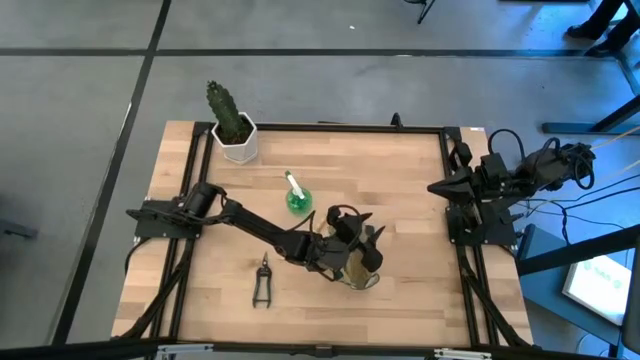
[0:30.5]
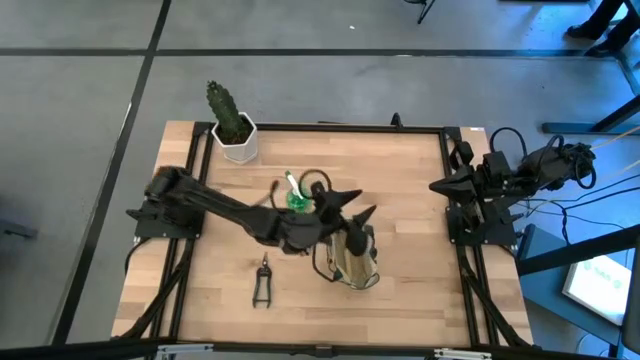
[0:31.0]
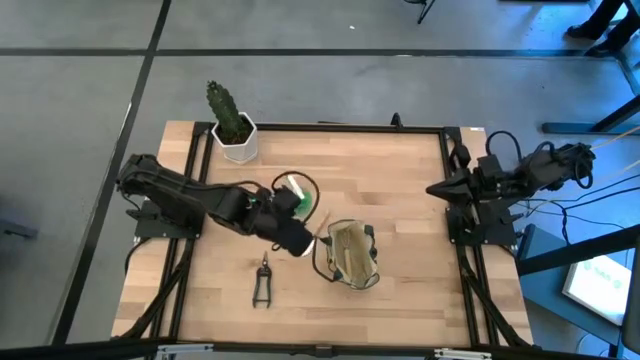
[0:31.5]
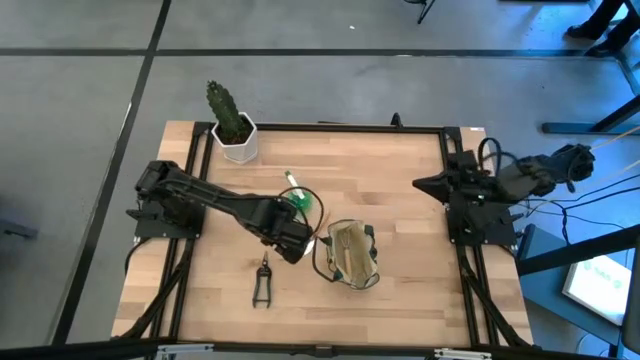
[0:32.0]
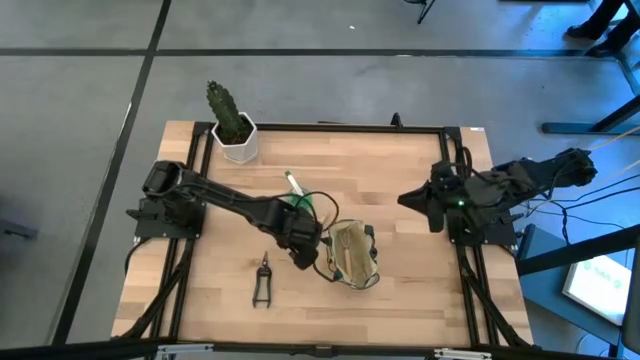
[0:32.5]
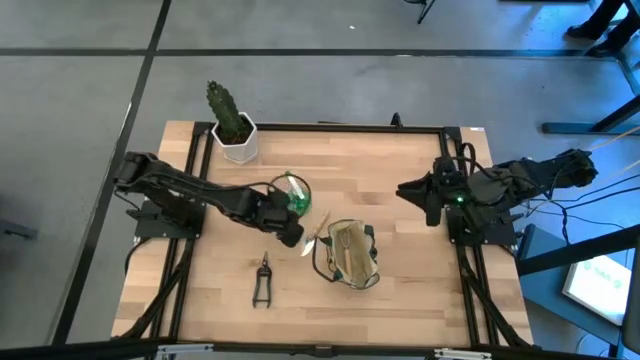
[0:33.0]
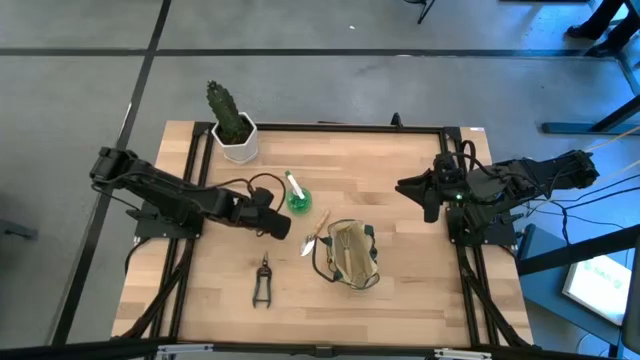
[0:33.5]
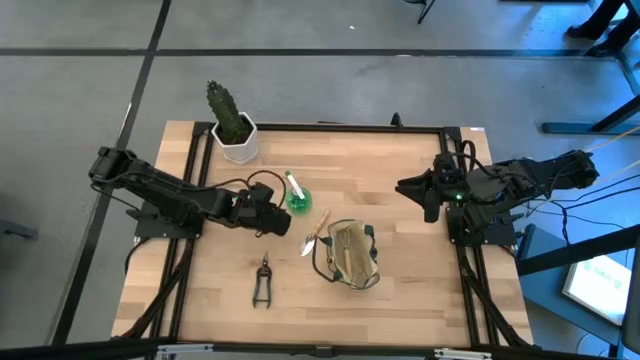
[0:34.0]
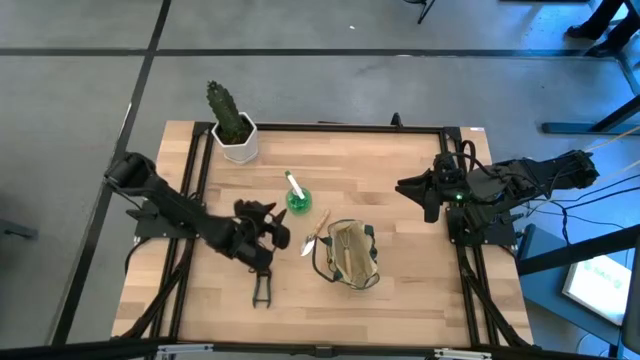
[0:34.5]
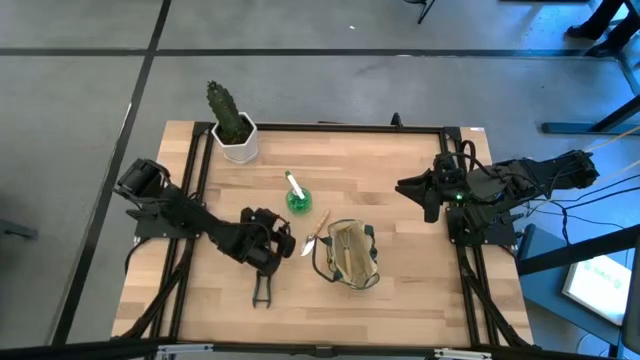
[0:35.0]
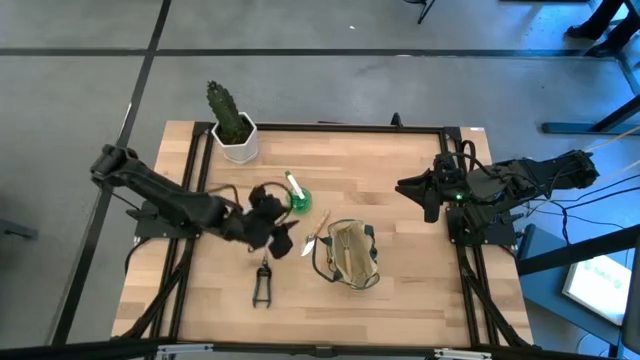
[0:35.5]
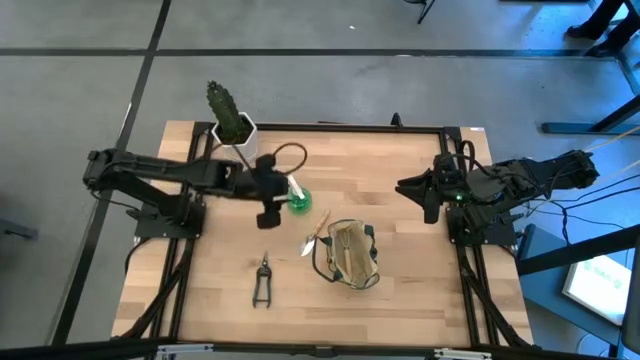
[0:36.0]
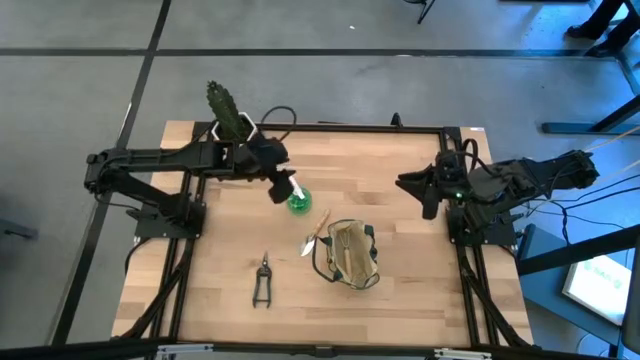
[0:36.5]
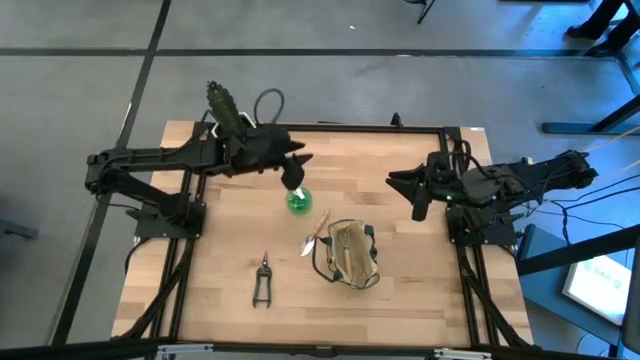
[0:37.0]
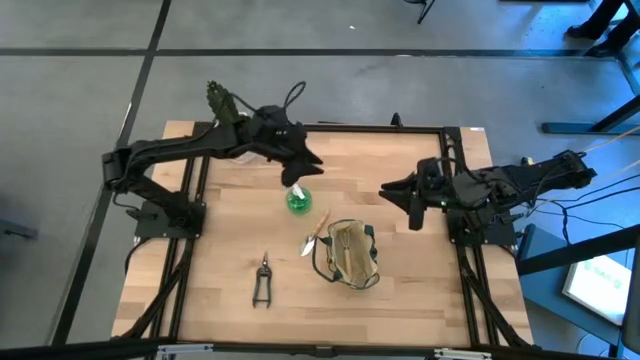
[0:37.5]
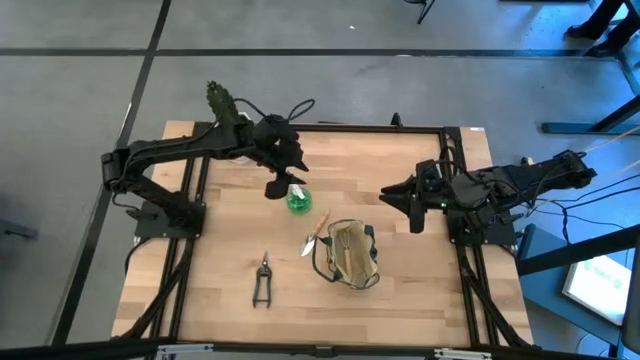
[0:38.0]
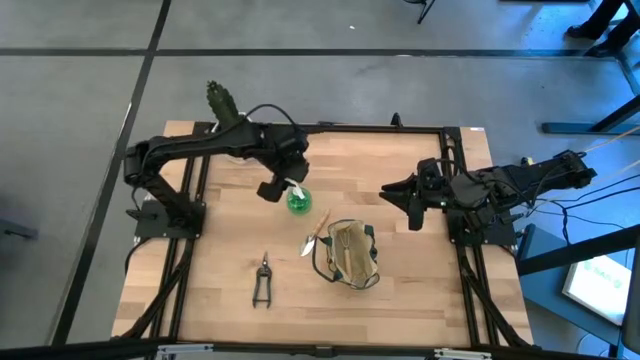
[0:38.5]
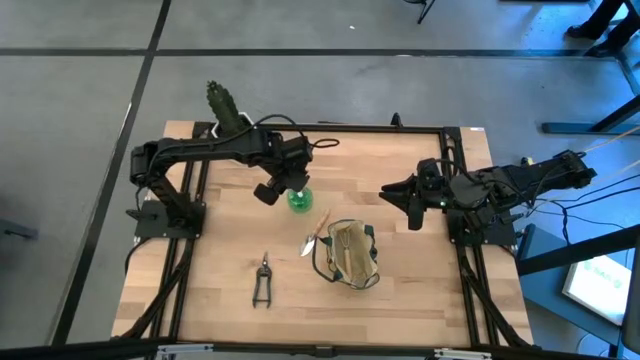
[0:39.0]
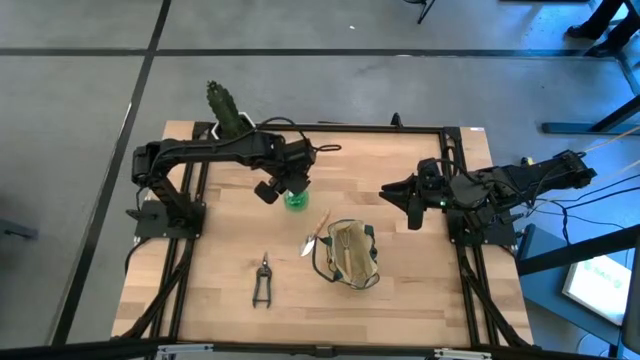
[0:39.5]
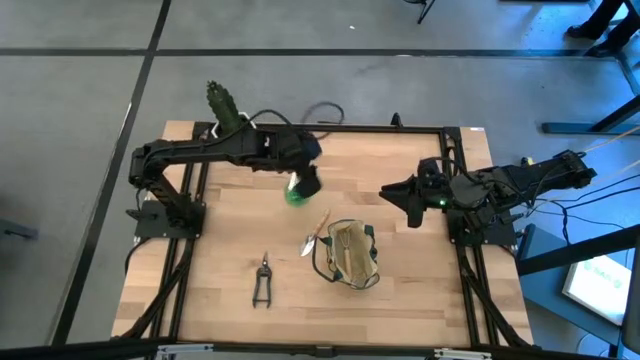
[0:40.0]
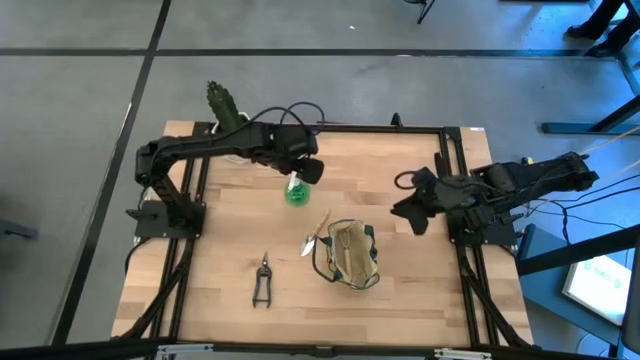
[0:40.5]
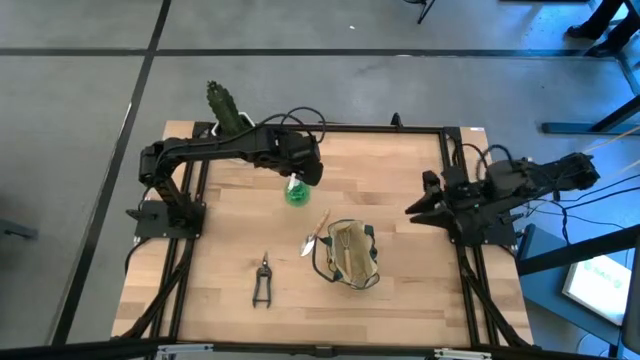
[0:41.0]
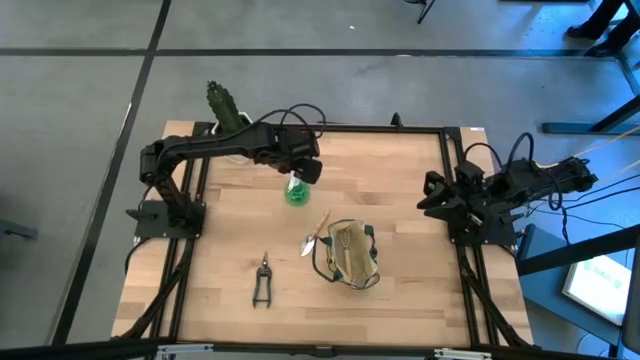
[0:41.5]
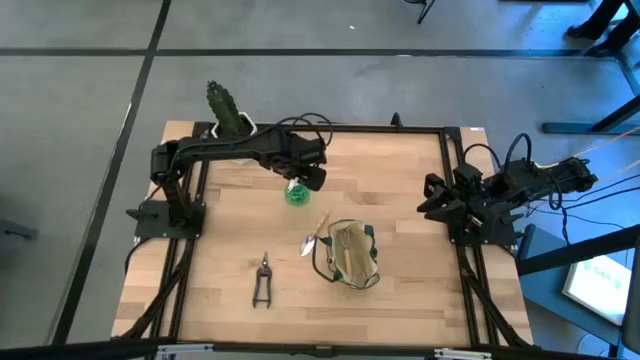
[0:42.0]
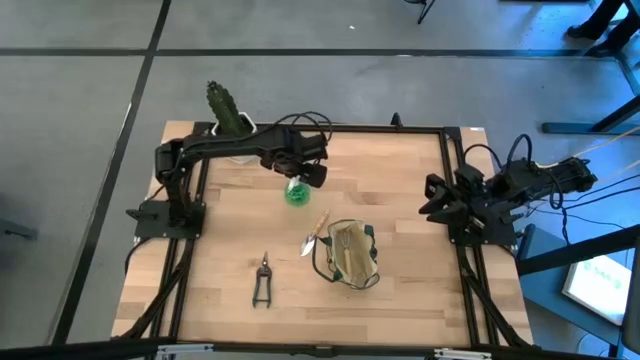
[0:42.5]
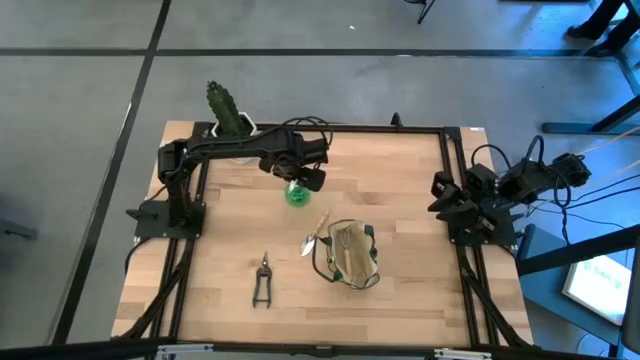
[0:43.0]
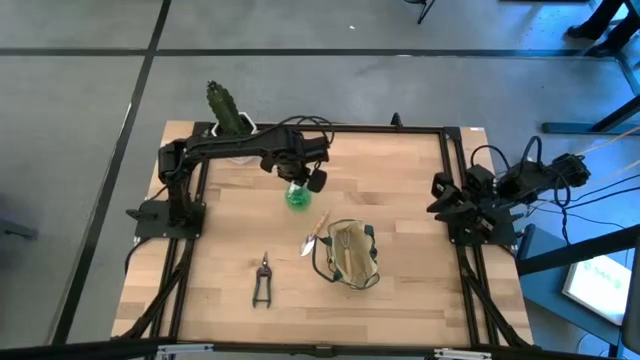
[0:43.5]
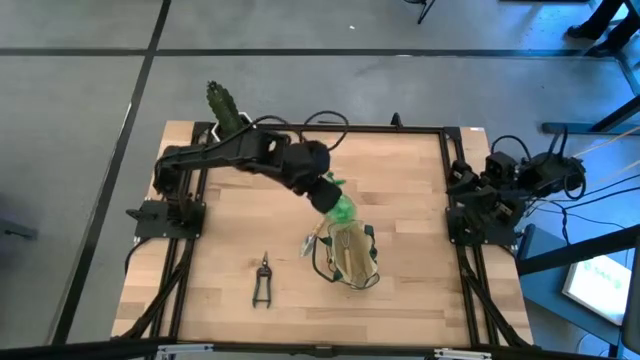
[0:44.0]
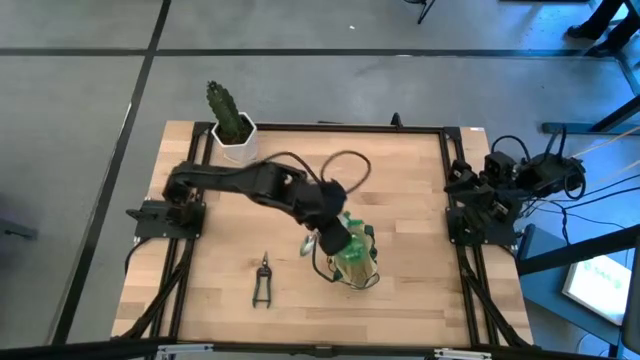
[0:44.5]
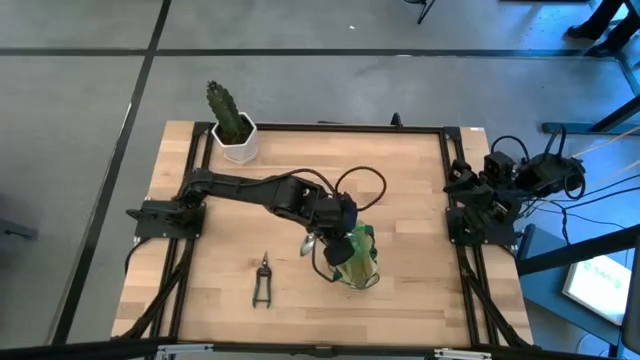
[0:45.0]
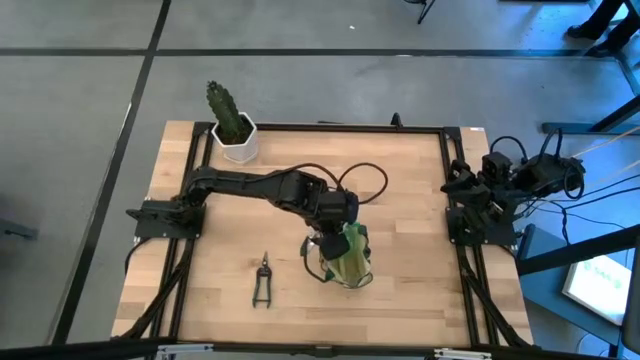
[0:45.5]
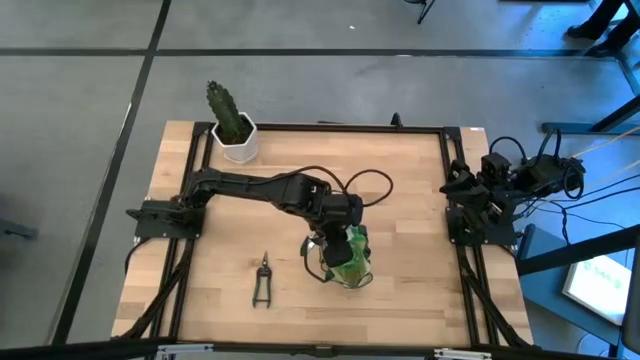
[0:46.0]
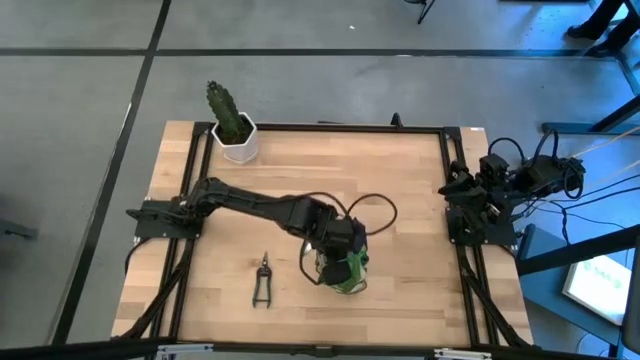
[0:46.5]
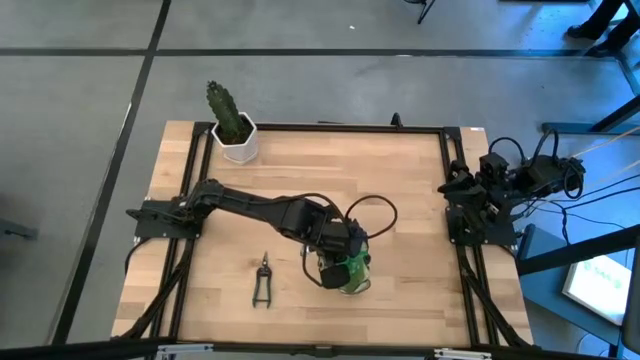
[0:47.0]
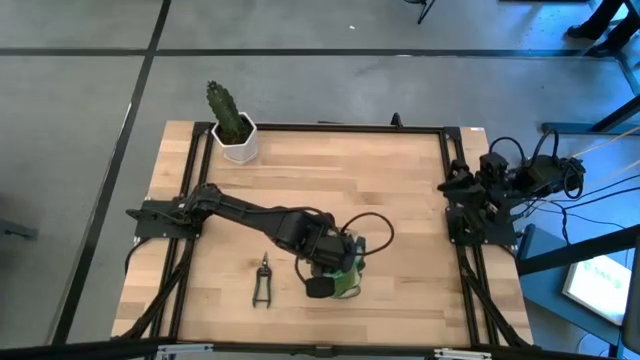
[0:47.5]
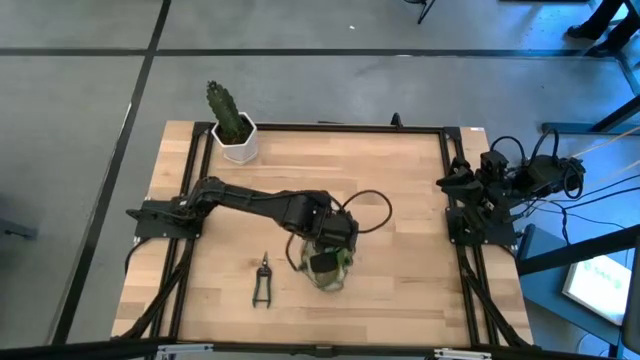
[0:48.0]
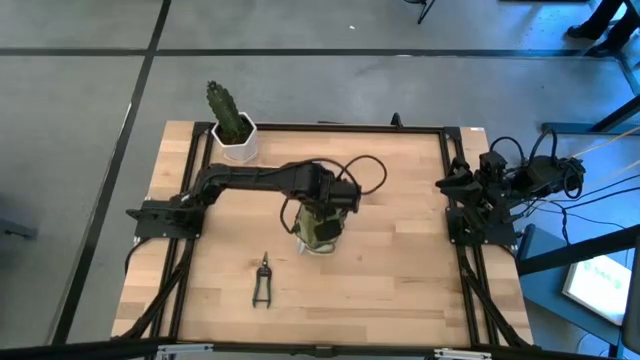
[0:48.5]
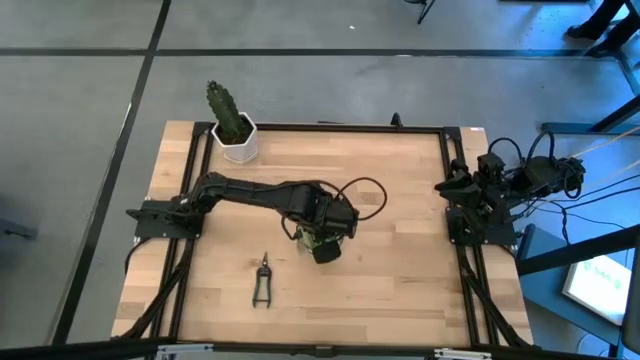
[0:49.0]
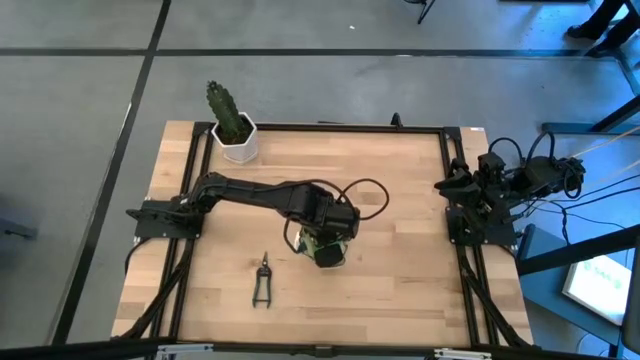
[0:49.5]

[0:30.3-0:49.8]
Task: Pick & Place Garden tools in Gardening bag
Put the green spray bottle into the light brown gardening bag
